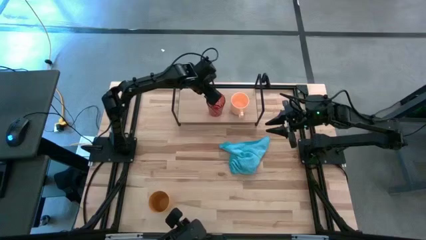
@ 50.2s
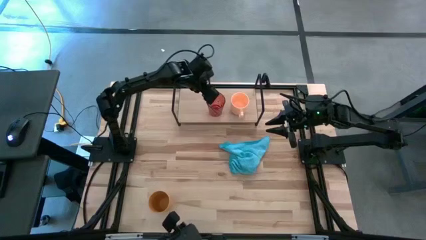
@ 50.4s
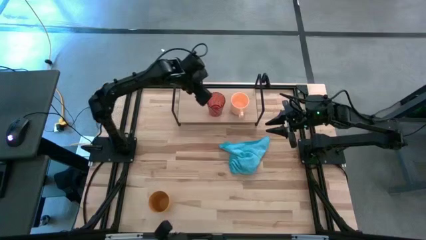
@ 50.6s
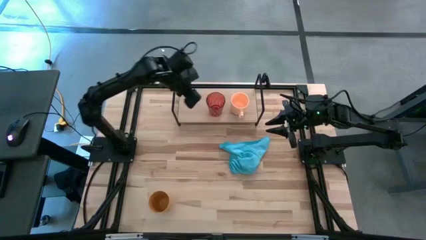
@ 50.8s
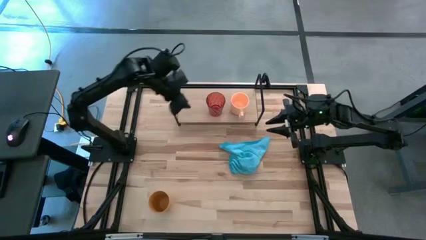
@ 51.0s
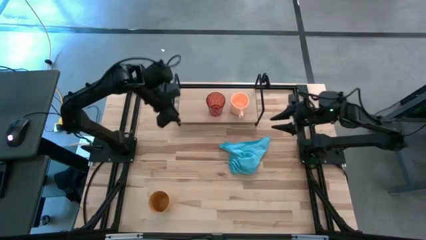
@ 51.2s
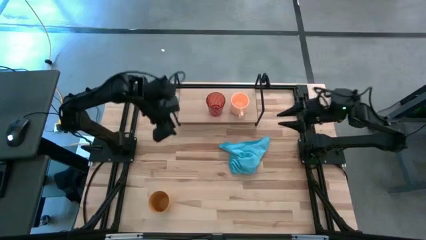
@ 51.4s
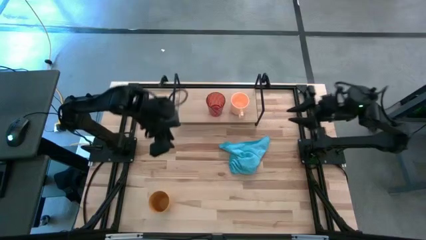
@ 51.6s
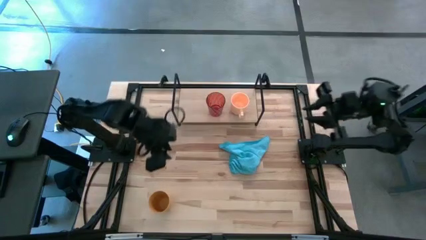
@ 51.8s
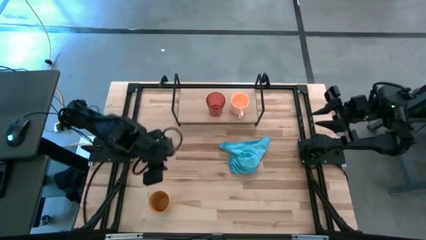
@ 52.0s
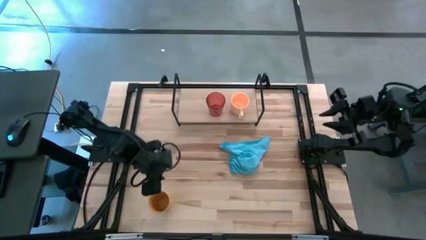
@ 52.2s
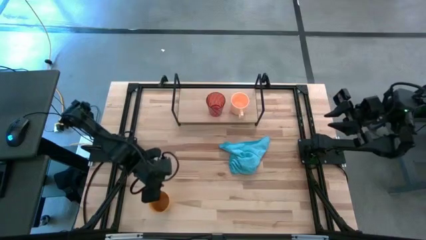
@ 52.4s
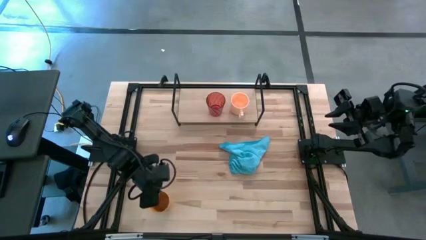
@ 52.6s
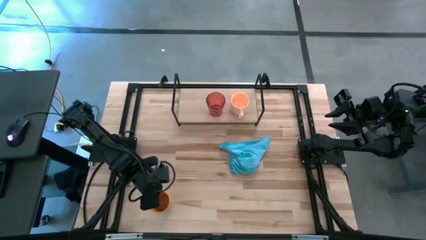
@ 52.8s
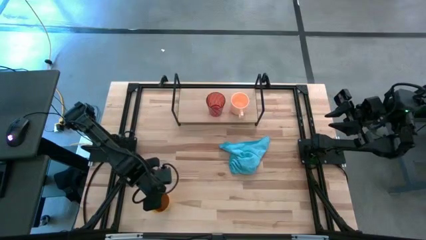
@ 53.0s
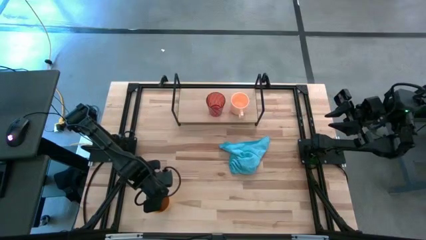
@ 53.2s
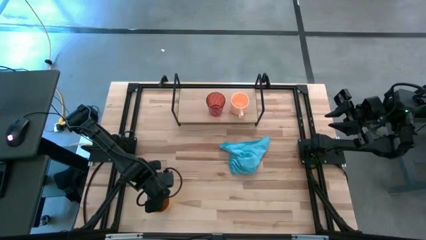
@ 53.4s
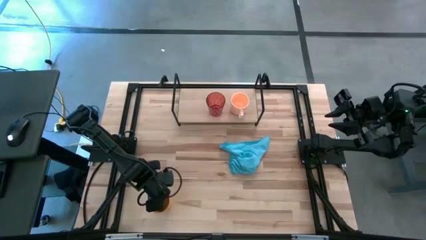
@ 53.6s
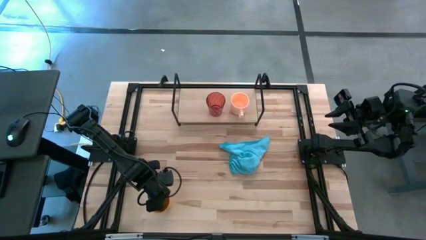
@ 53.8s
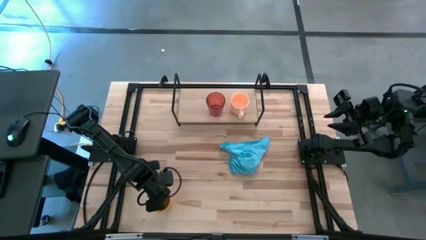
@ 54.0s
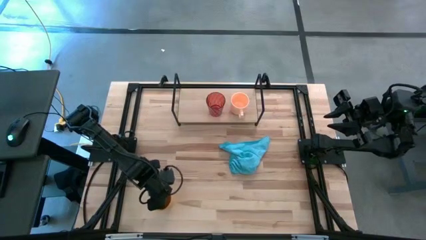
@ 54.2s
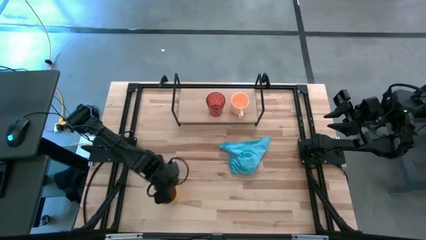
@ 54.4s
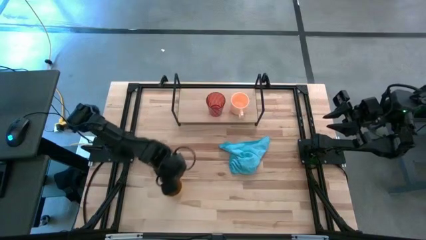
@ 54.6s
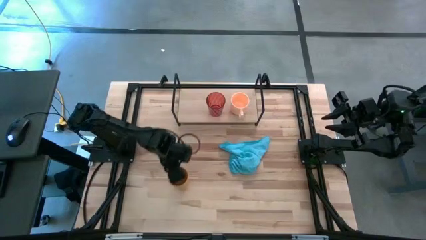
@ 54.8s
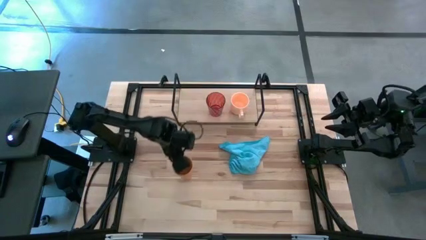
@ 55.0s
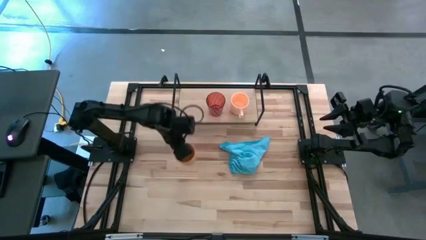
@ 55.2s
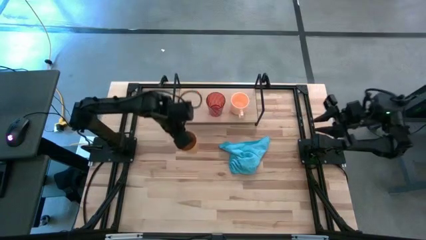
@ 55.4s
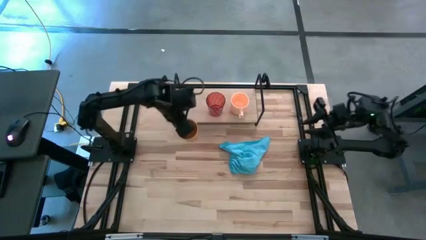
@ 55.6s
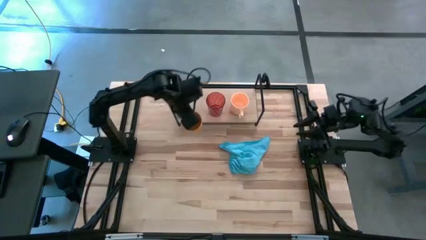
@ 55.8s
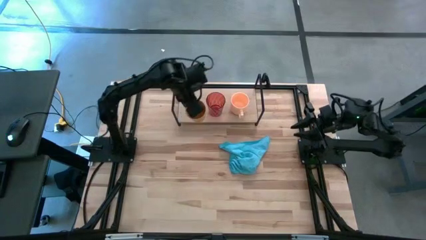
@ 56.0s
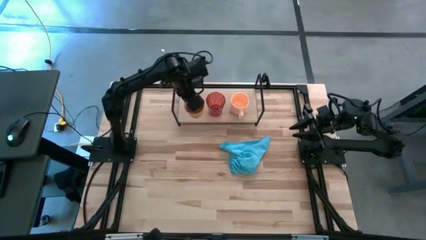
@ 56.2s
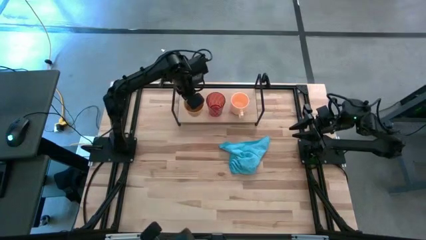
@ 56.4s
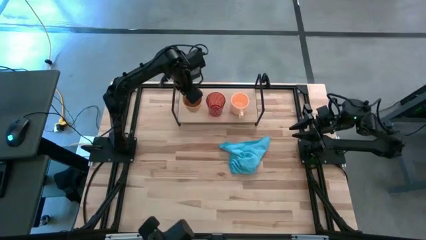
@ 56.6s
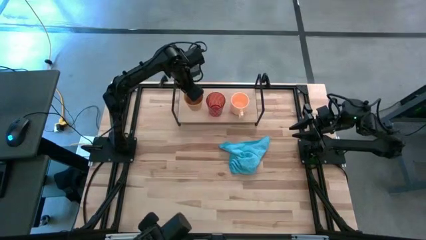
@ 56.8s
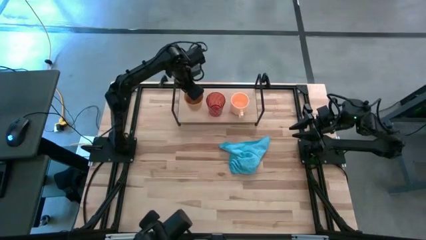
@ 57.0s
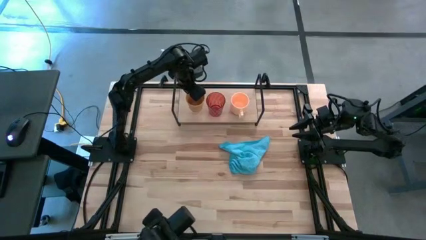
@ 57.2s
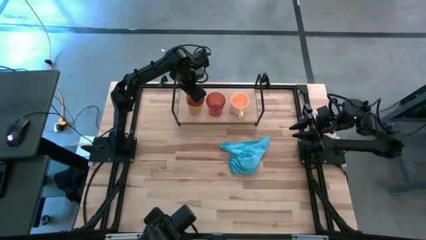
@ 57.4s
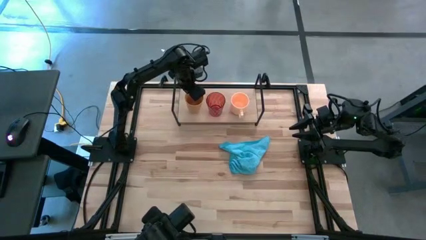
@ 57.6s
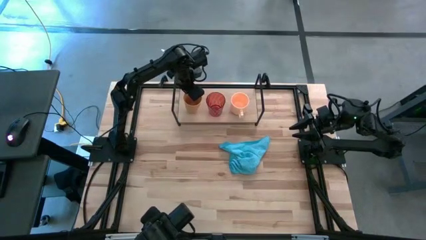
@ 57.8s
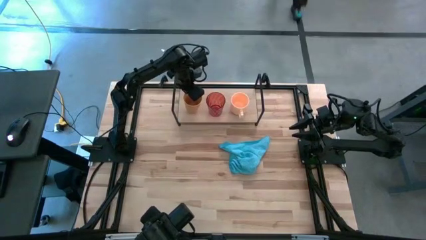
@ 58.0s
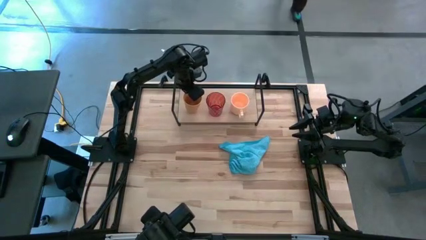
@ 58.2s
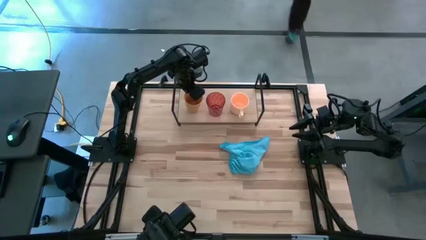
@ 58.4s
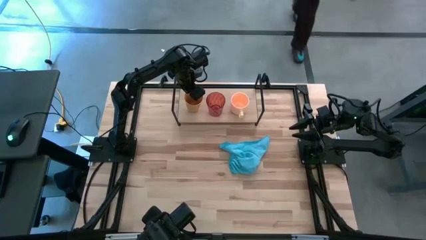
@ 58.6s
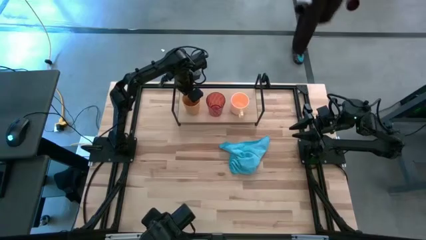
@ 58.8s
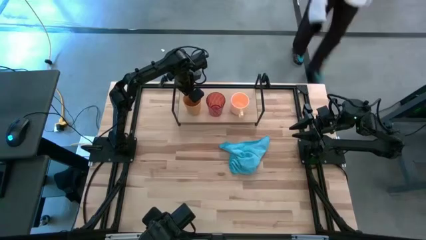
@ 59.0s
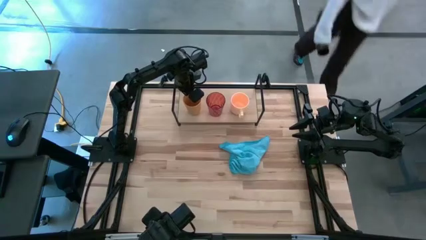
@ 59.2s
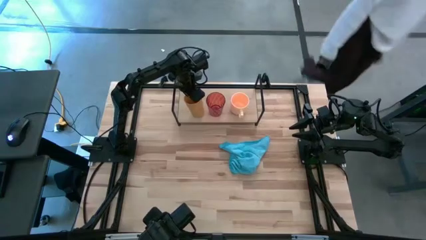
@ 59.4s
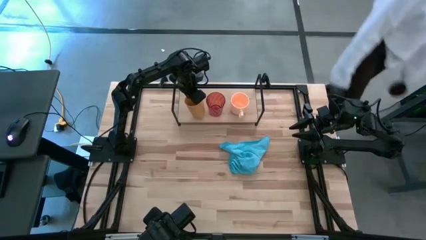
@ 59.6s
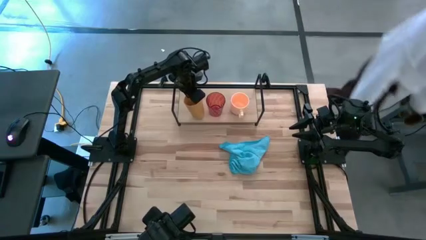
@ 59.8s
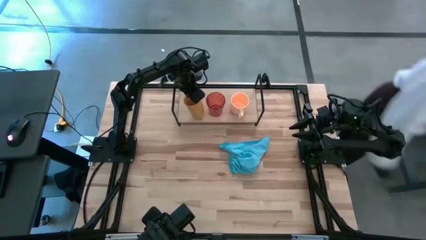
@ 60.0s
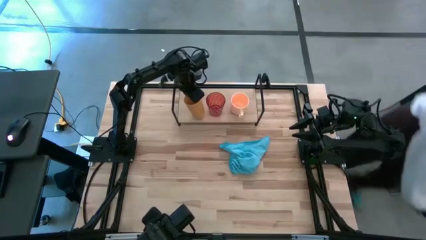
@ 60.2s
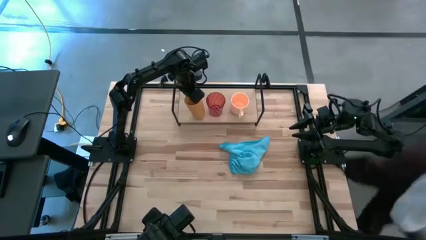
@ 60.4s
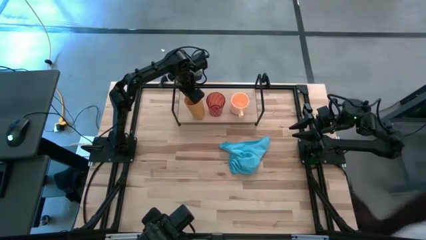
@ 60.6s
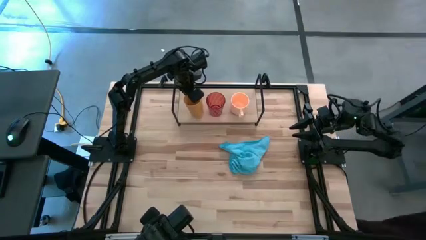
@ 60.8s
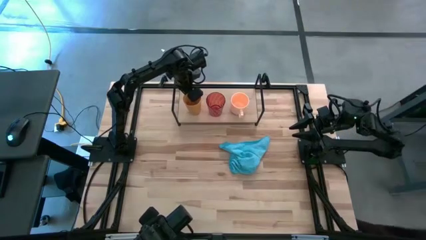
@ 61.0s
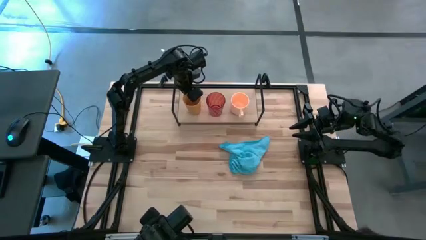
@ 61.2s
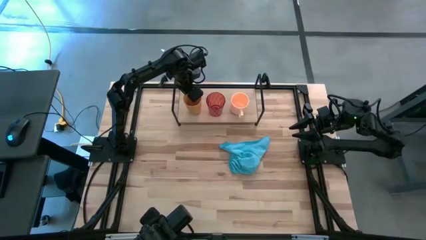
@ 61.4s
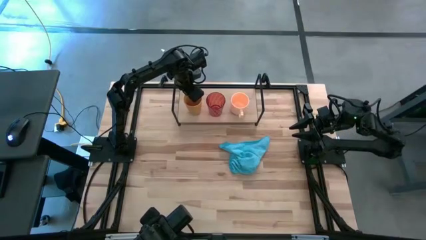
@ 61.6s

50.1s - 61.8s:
Task: Stack small to large cups/mugs on shelf
Put the yellow cup on the shelf
